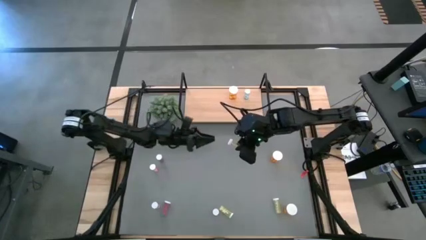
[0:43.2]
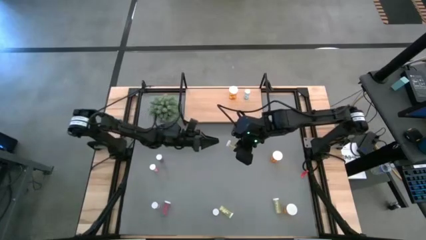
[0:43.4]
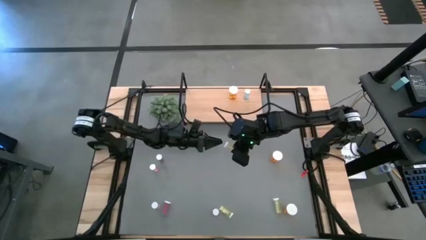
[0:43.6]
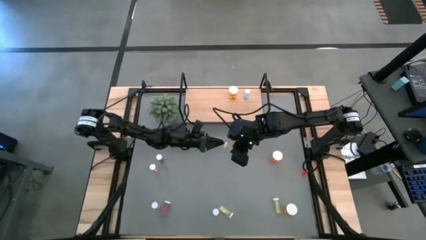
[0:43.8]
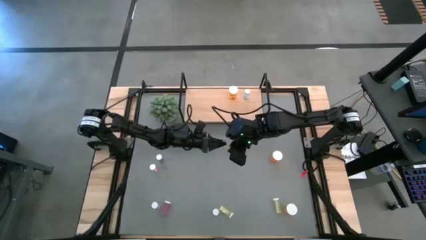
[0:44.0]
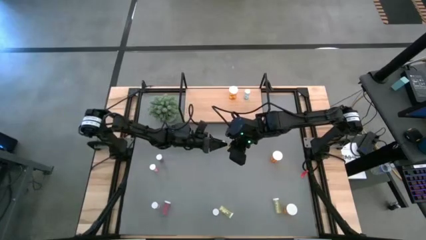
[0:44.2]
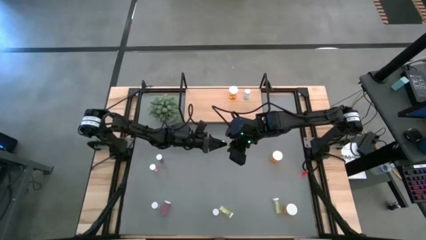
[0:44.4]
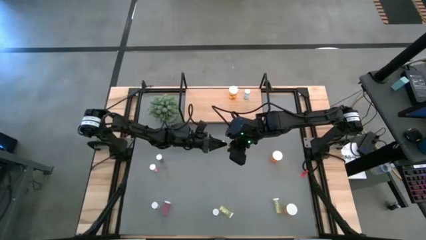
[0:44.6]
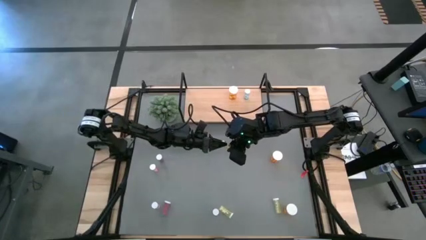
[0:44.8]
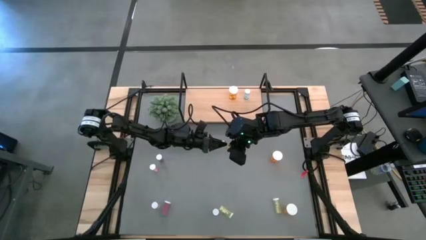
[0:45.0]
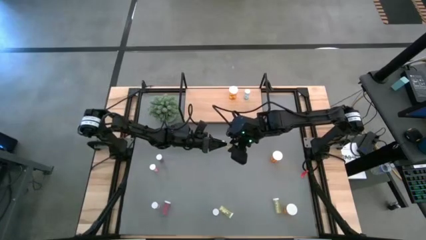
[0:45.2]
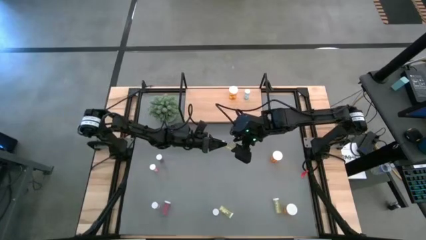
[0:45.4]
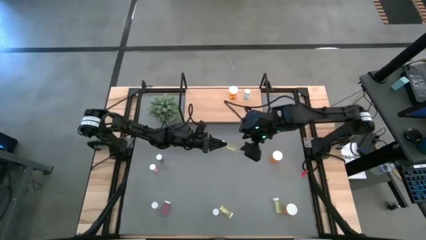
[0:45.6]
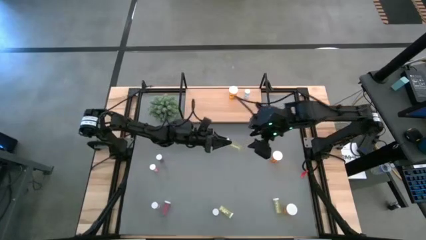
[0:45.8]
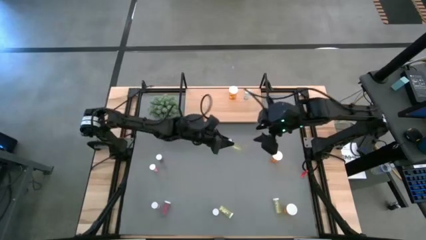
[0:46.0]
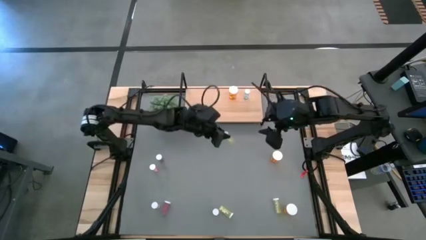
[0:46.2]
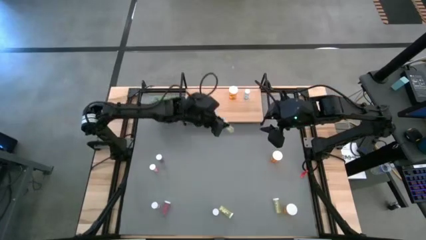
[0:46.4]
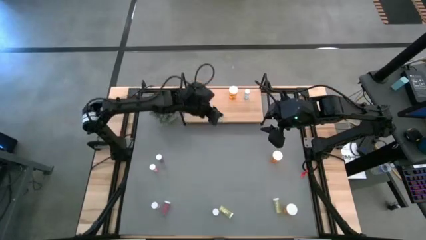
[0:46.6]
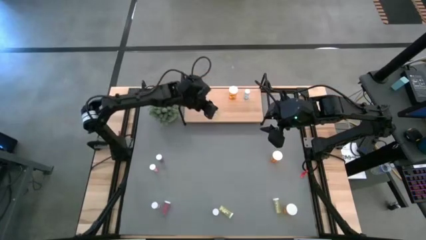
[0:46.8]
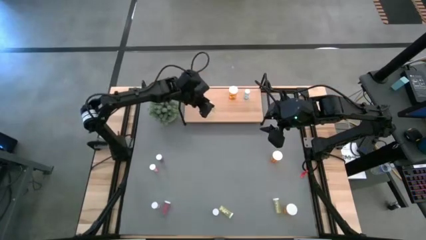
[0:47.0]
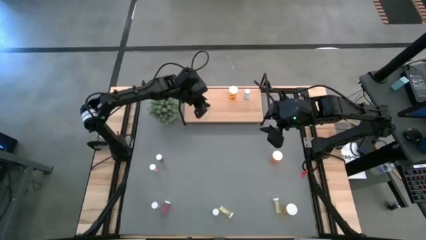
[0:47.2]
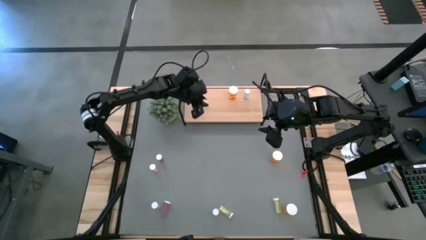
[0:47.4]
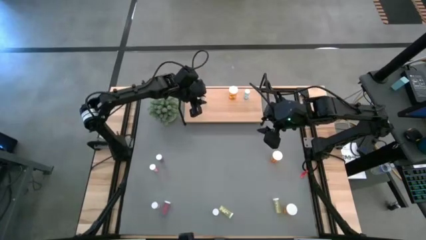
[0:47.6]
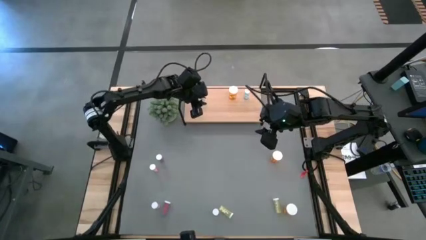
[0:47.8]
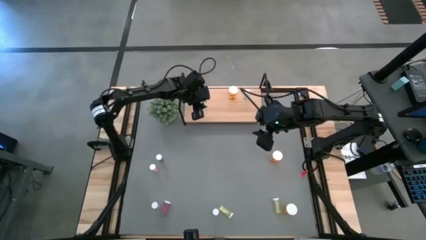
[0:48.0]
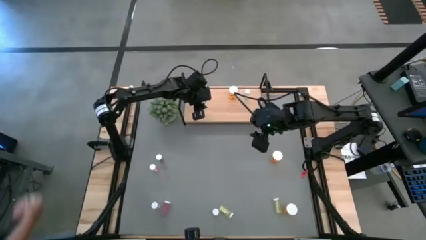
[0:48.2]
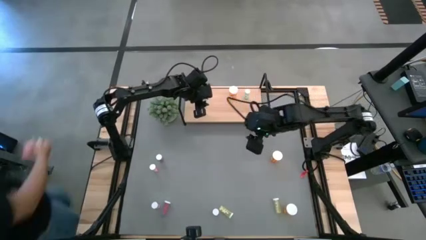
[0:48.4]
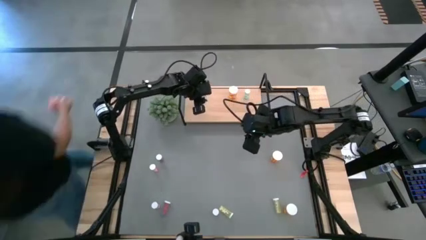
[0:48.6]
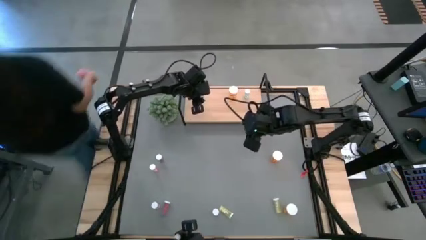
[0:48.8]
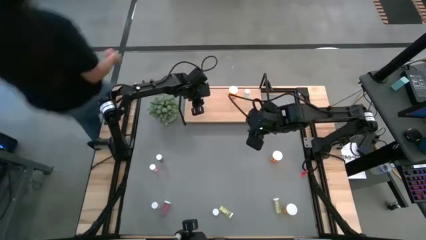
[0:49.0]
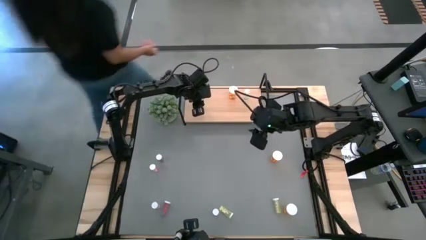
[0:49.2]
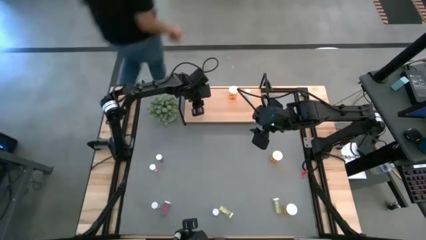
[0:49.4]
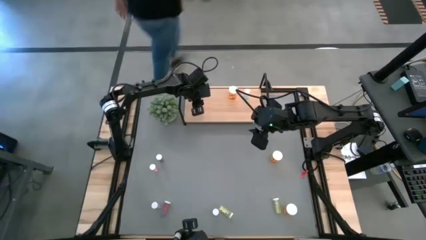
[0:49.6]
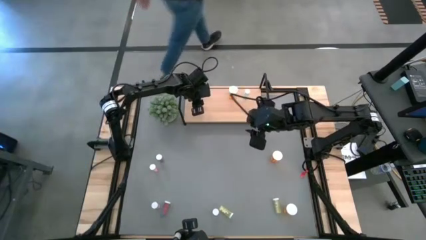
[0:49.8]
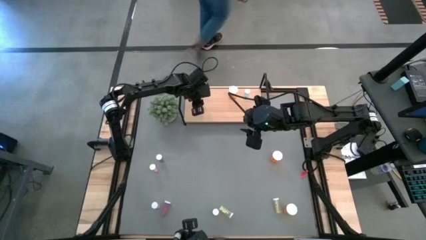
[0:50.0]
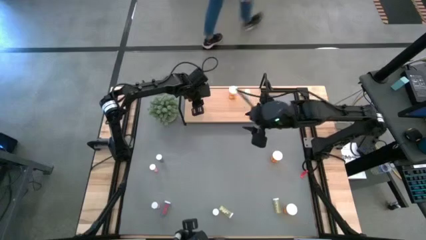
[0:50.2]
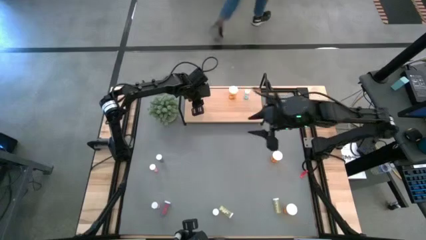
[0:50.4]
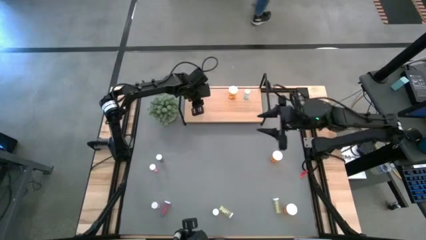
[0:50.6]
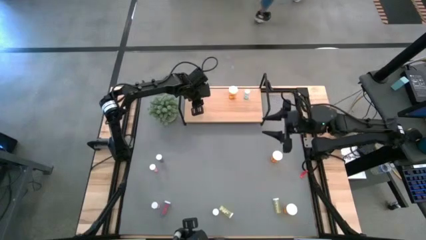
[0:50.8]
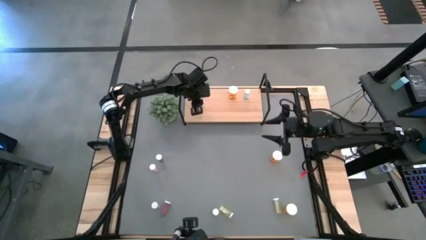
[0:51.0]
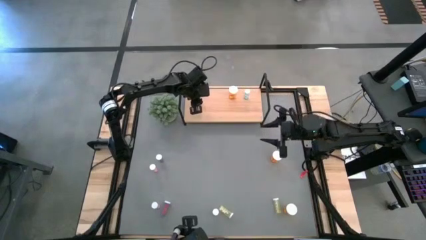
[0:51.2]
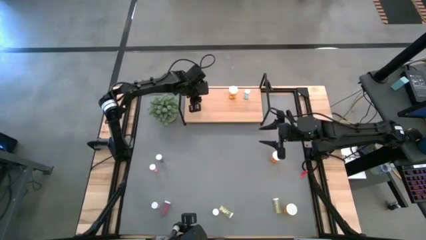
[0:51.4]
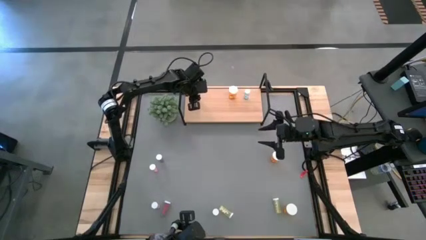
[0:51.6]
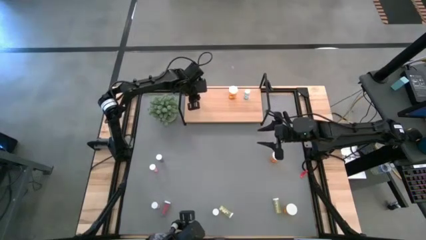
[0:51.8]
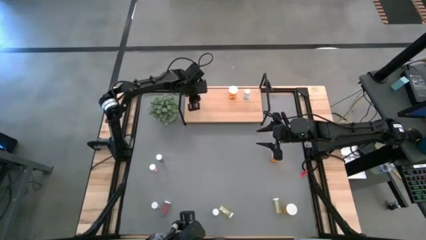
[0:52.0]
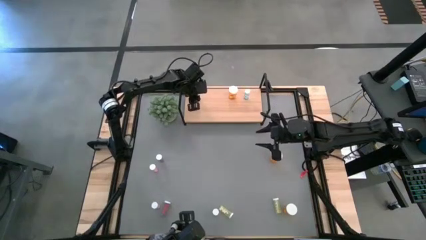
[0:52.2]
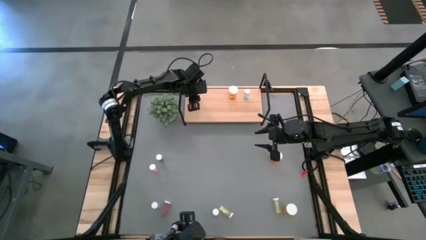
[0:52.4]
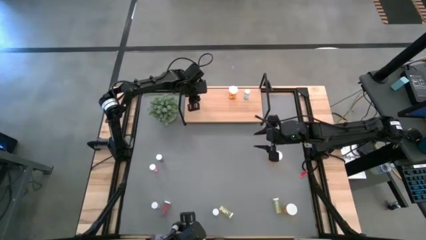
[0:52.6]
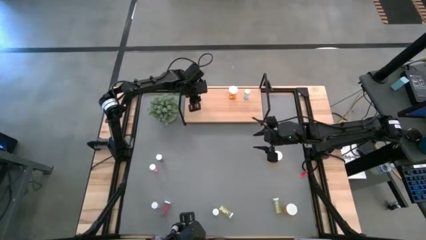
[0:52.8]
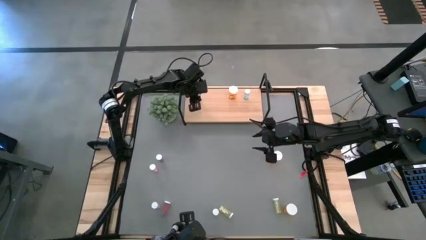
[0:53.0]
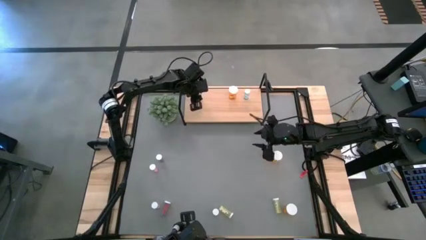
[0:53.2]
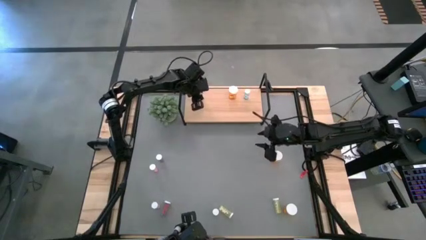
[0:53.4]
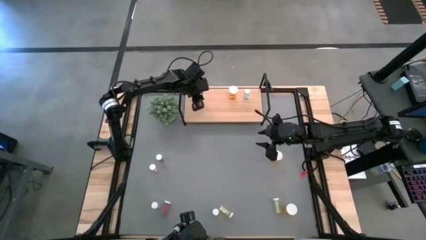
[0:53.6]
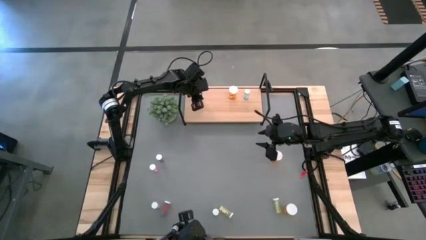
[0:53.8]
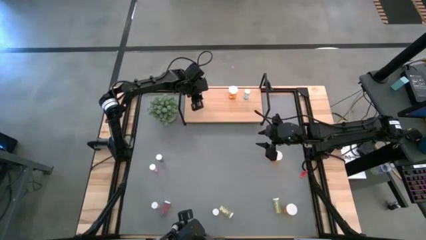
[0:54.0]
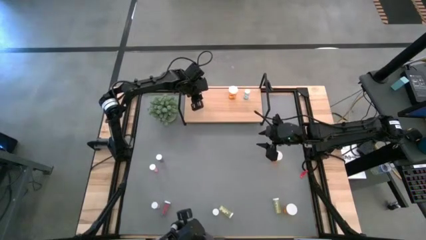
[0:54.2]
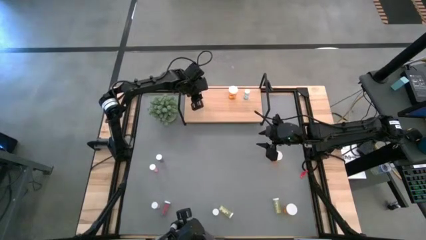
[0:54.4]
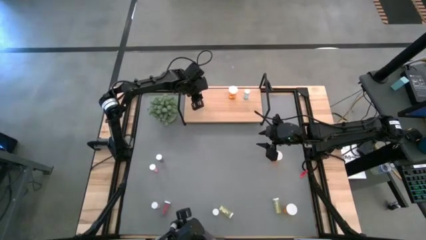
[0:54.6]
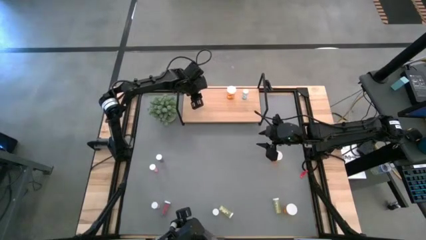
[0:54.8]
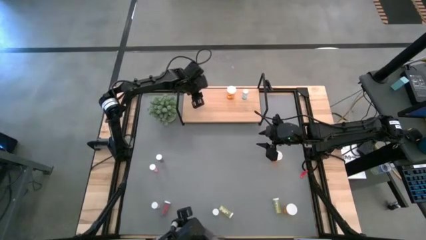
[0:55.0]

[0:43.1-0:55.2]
Task: Pick and place medicine bottles onto shelf by color
Put the top yellow pill bottle on the shelf

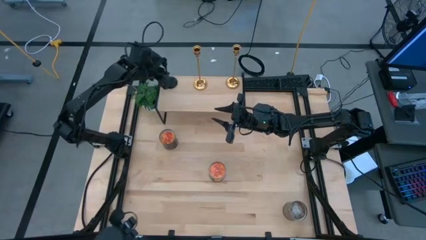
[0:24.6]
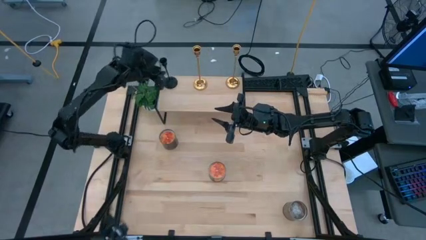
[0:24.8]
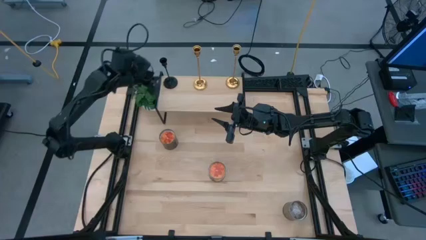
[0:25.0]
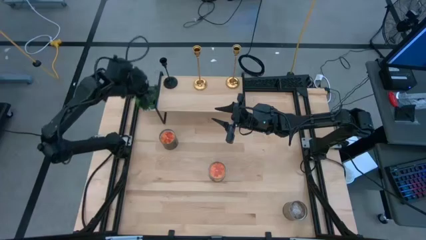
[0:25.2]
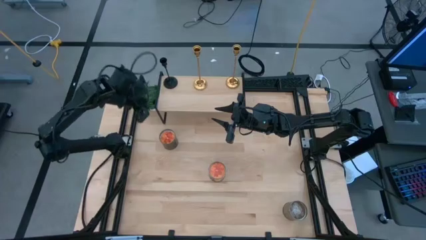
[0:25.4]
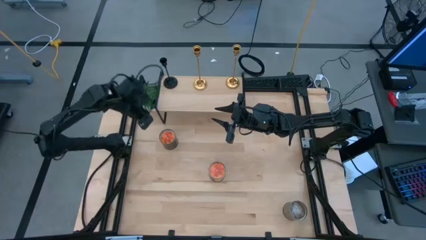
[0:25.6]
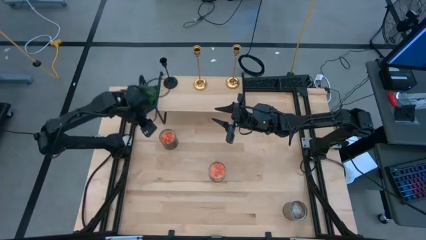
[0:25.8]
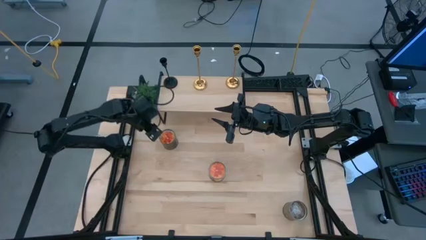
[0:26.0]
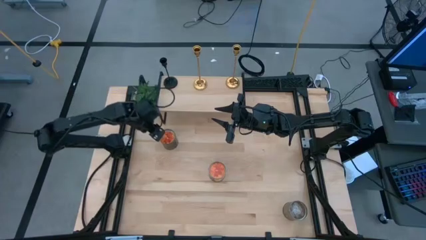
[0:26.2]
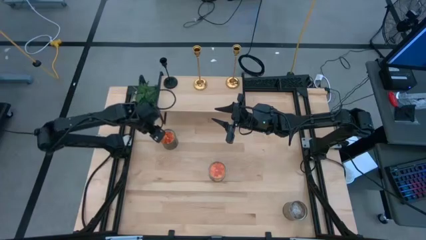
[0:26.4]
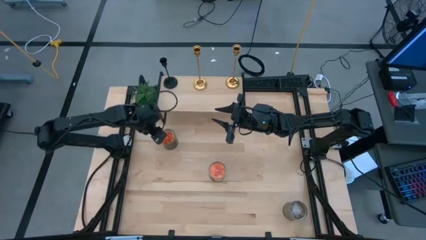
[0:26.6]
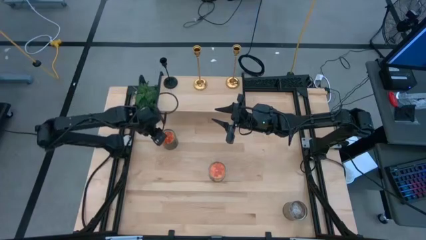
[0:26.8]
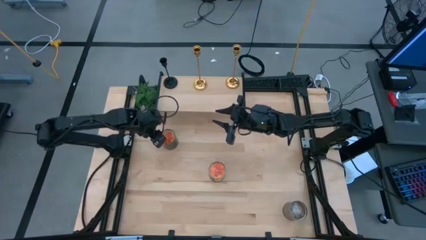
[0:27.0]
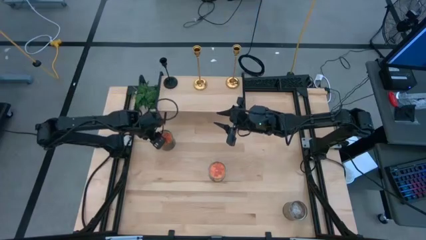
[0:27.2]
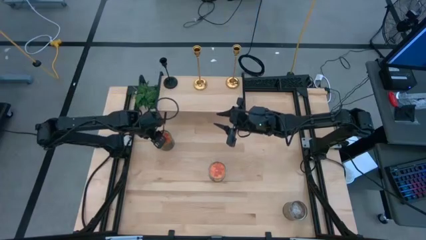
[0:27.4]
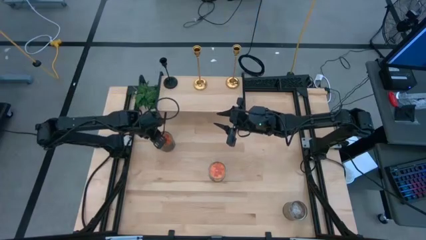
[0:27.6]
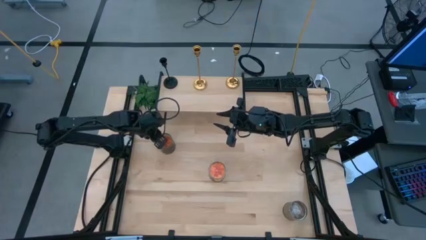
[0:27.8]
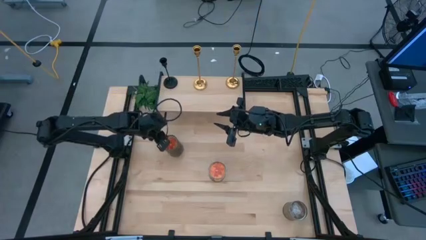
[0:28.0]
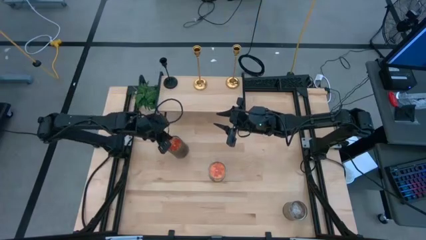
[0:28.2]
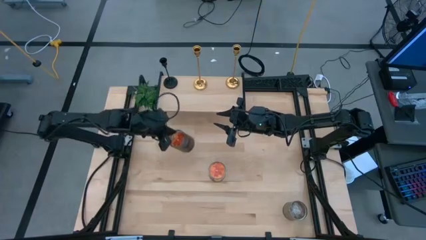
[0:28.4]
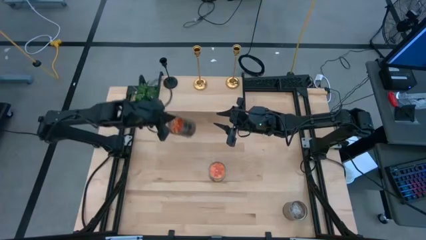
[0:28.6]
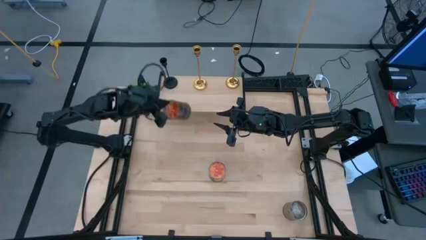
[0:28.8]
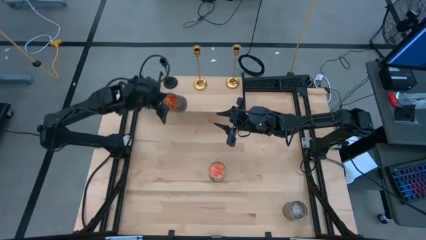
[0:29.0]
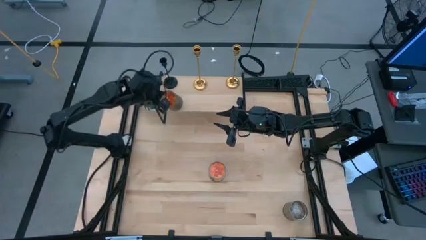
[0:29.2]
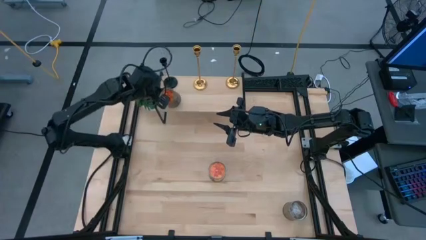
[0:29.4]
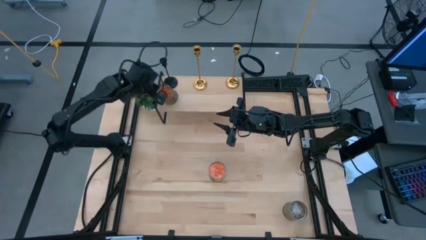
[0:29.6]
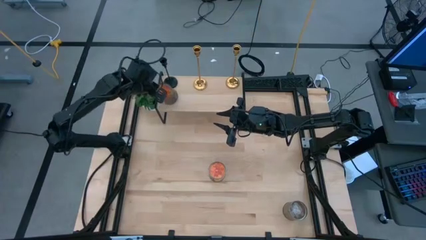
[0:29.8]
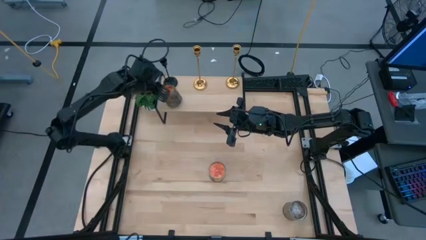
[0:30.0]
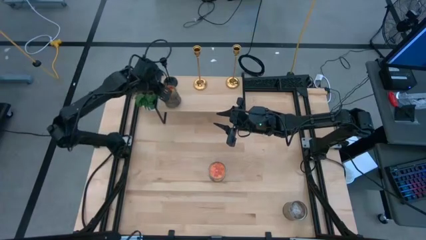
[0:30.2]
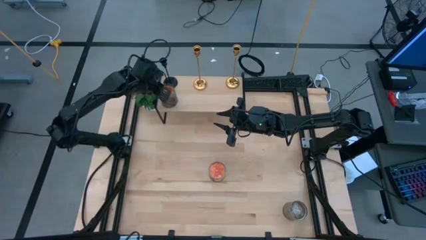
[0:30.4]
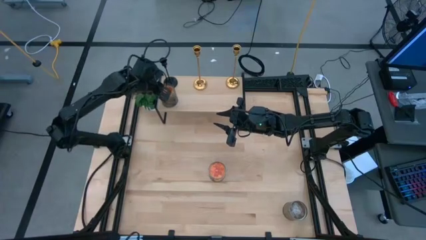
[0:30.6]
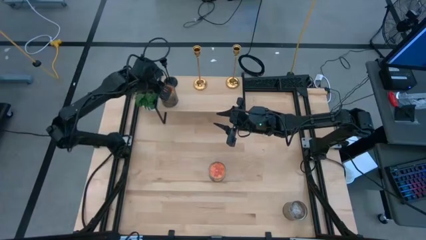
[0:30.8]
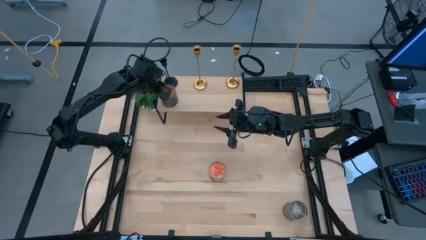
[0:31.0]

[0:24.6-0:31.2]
Task: Pick & Place candle stick holders
Put the left scented candle on the shelf
